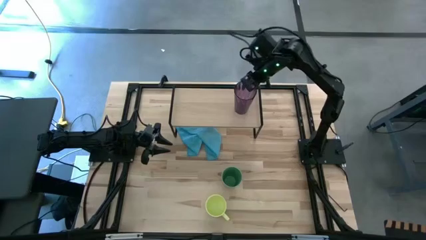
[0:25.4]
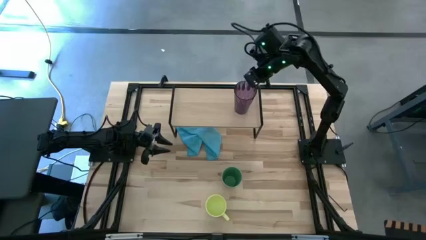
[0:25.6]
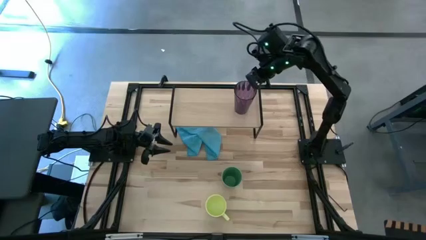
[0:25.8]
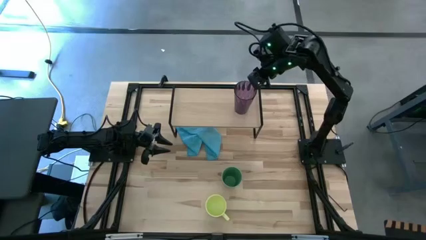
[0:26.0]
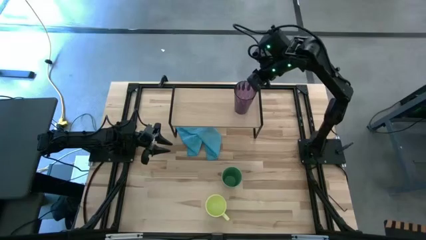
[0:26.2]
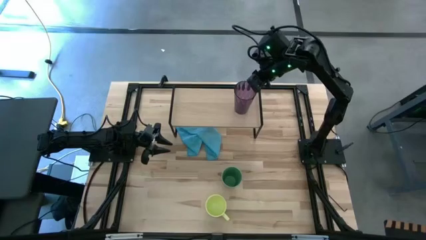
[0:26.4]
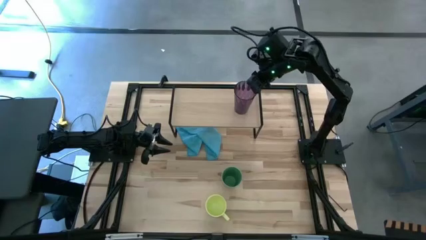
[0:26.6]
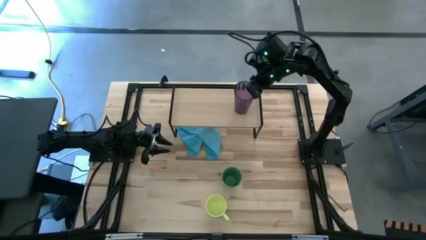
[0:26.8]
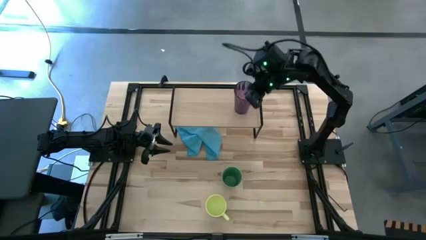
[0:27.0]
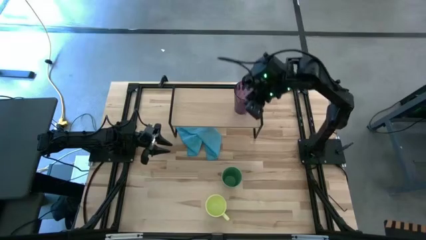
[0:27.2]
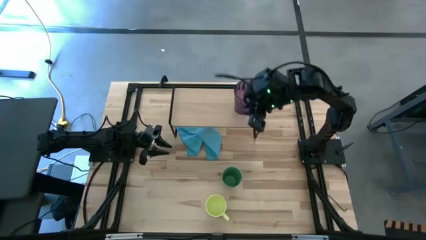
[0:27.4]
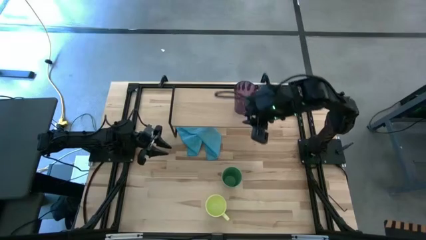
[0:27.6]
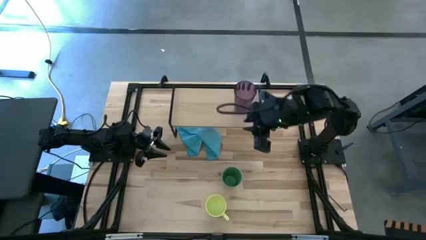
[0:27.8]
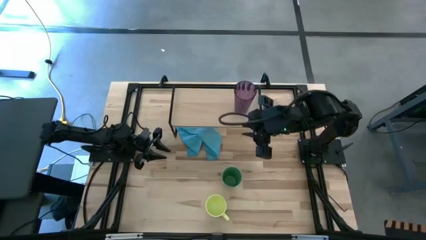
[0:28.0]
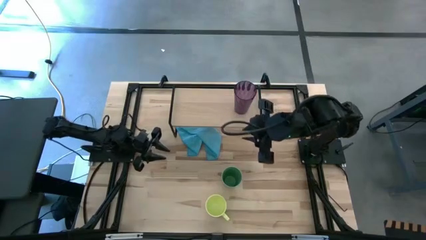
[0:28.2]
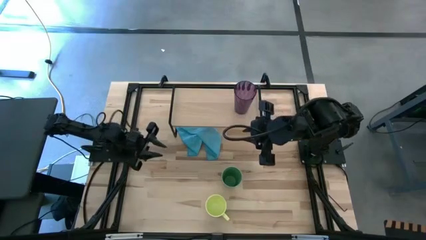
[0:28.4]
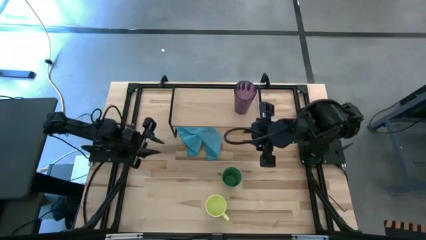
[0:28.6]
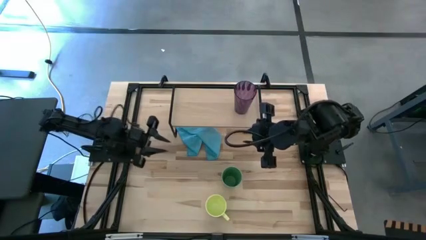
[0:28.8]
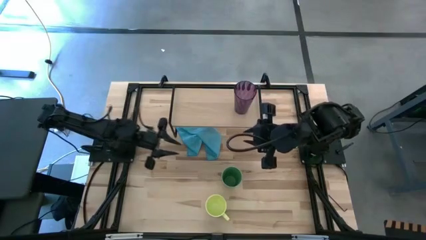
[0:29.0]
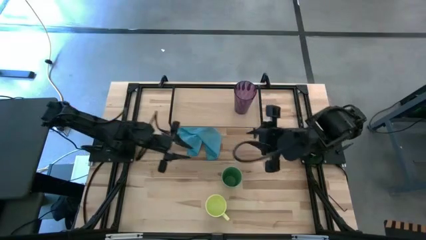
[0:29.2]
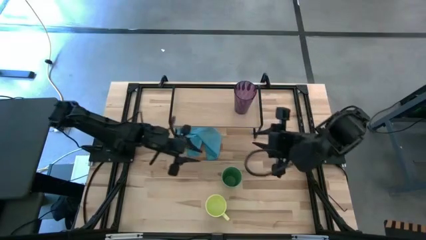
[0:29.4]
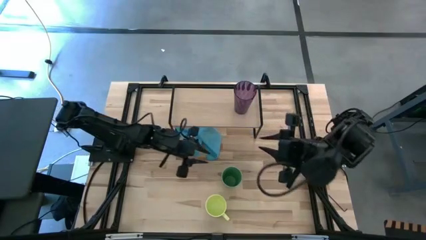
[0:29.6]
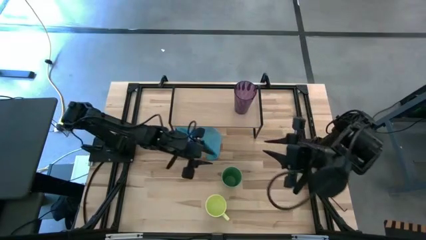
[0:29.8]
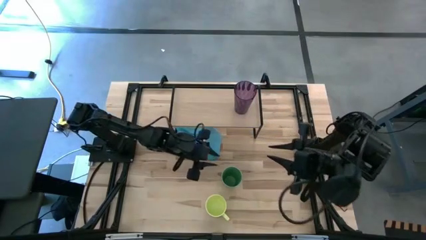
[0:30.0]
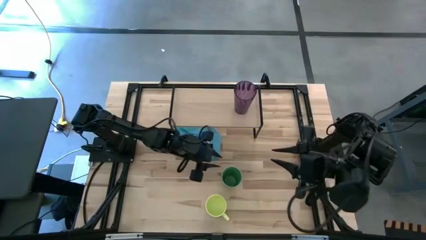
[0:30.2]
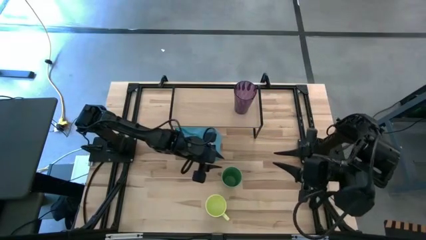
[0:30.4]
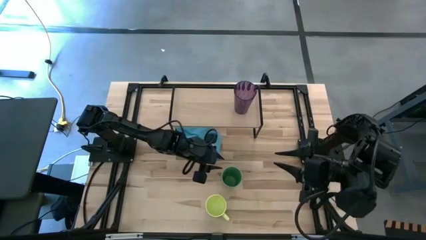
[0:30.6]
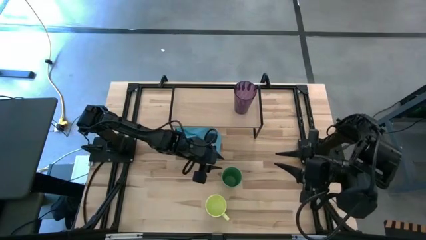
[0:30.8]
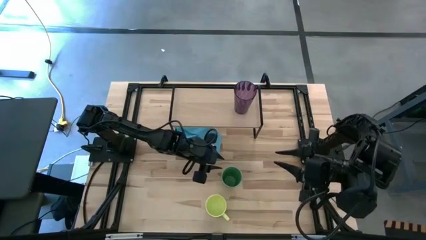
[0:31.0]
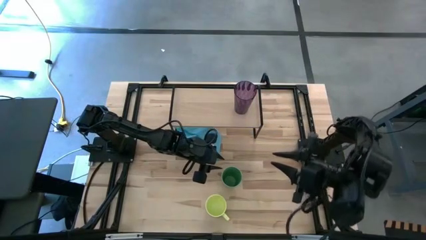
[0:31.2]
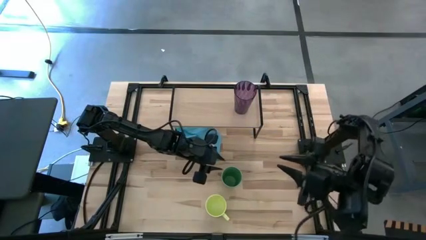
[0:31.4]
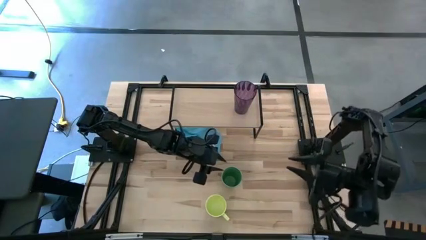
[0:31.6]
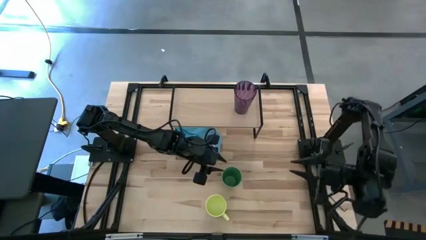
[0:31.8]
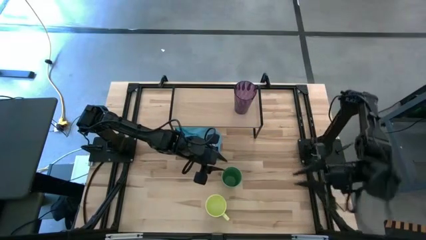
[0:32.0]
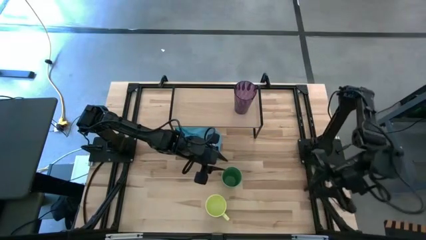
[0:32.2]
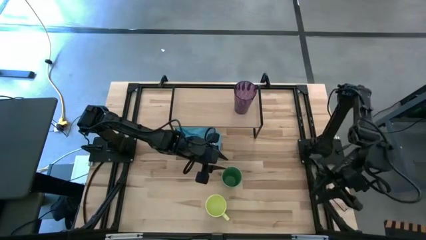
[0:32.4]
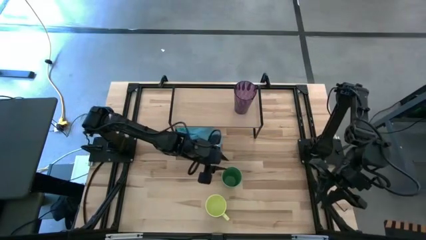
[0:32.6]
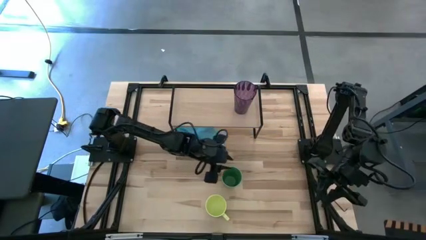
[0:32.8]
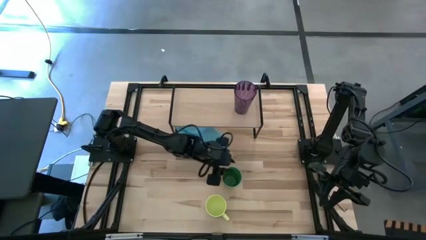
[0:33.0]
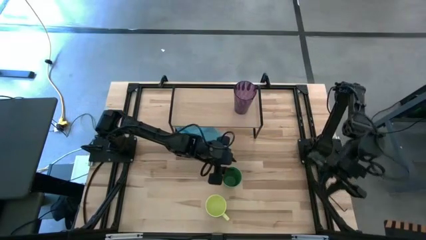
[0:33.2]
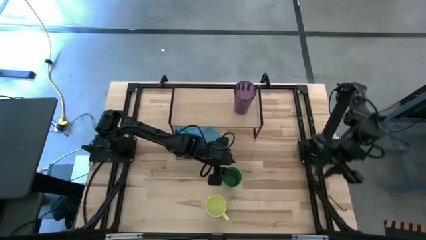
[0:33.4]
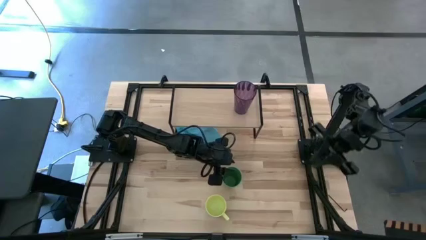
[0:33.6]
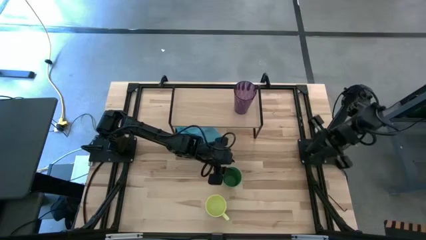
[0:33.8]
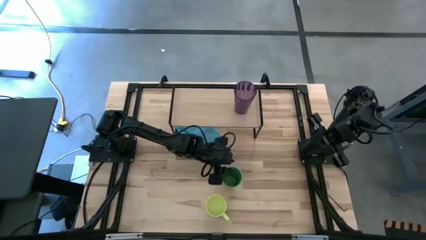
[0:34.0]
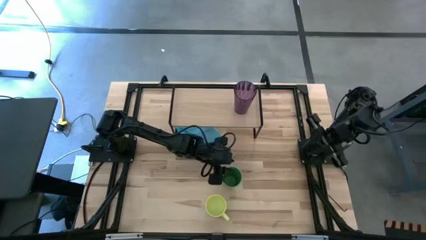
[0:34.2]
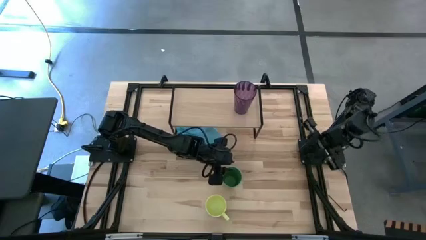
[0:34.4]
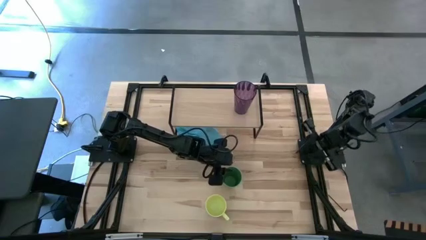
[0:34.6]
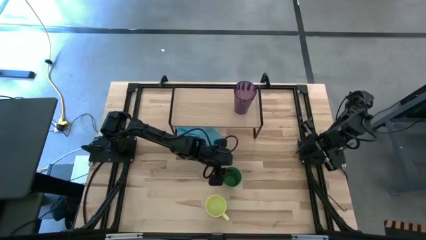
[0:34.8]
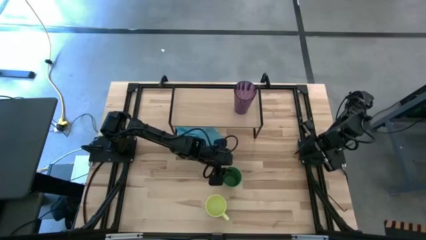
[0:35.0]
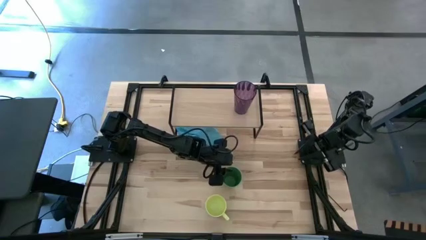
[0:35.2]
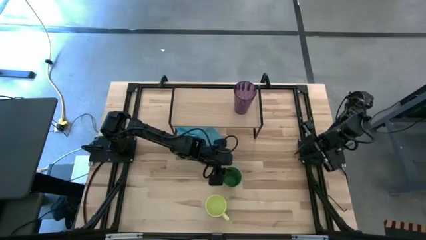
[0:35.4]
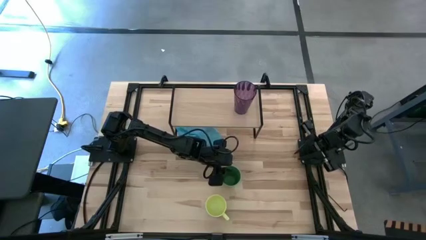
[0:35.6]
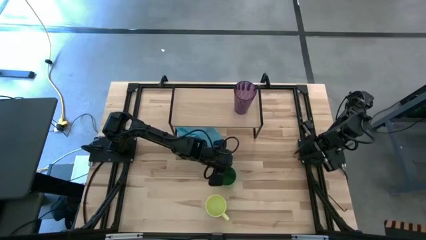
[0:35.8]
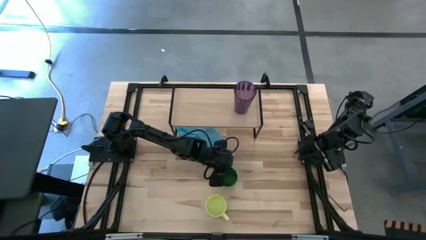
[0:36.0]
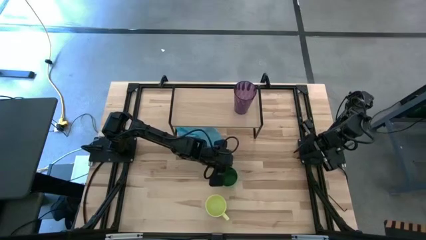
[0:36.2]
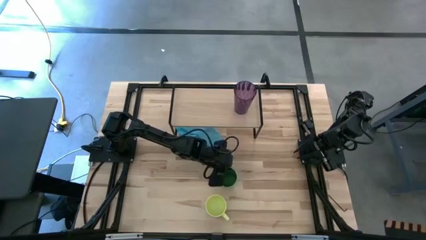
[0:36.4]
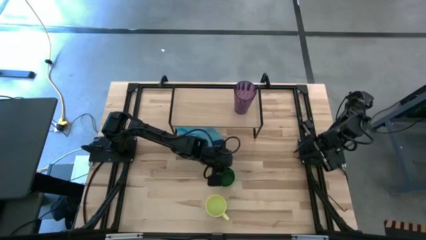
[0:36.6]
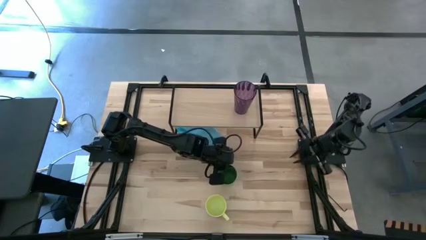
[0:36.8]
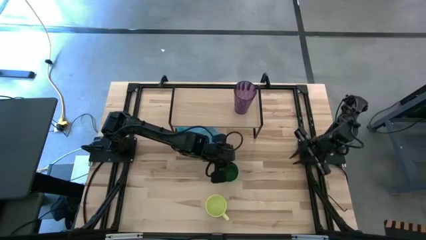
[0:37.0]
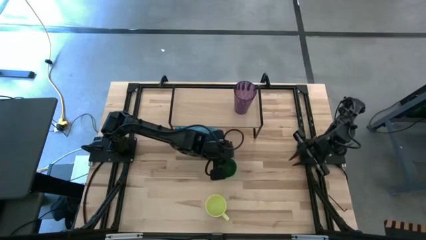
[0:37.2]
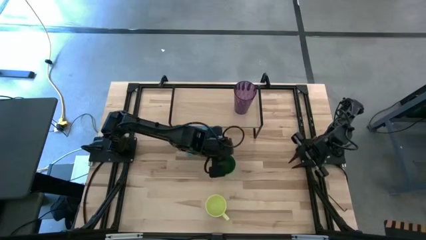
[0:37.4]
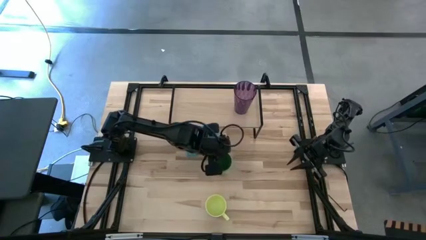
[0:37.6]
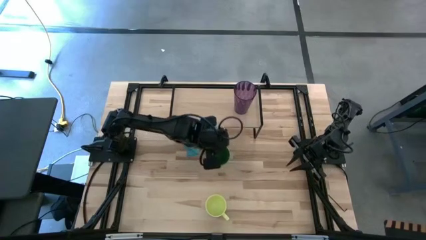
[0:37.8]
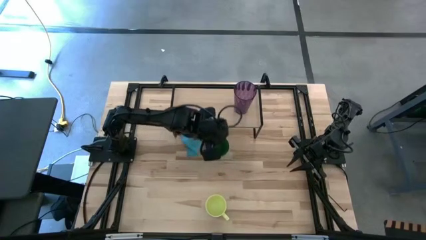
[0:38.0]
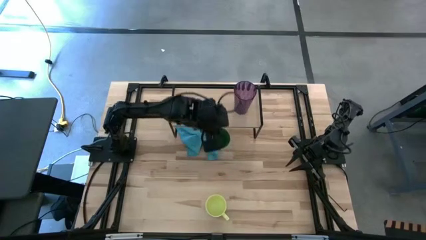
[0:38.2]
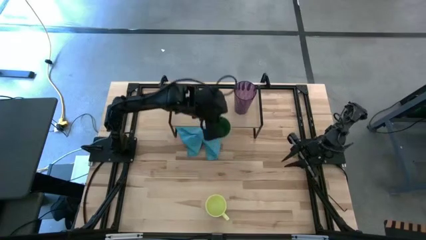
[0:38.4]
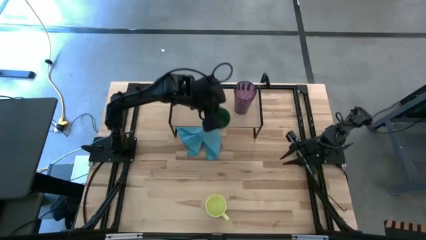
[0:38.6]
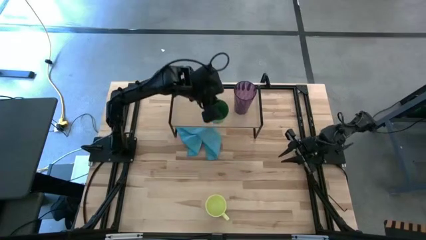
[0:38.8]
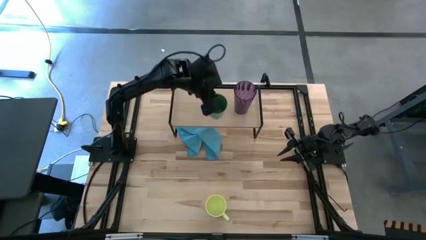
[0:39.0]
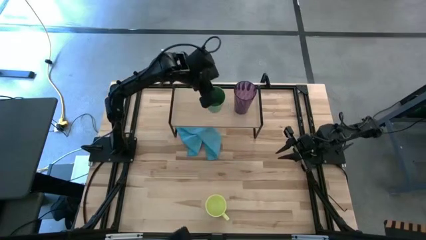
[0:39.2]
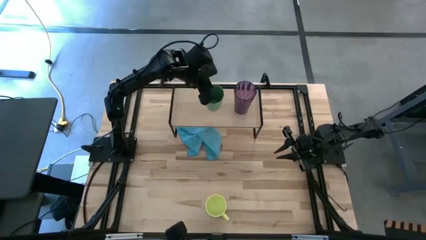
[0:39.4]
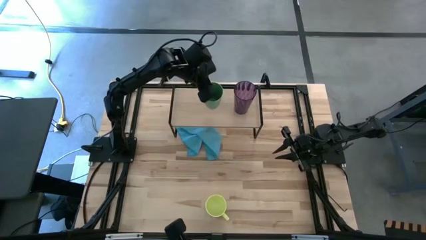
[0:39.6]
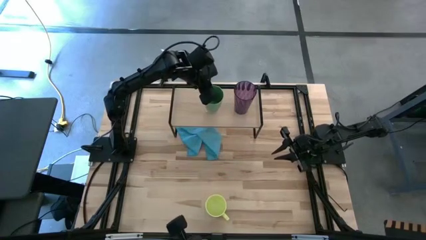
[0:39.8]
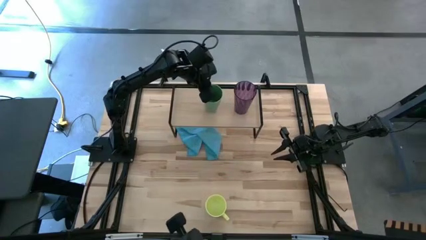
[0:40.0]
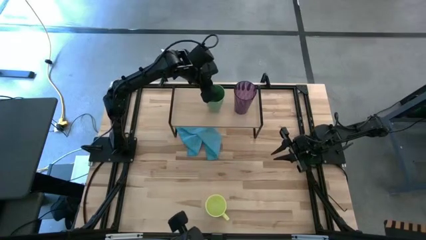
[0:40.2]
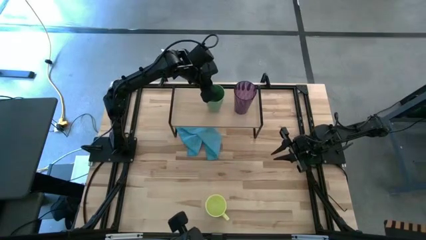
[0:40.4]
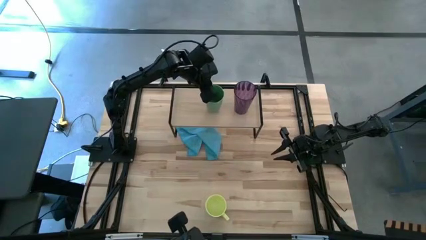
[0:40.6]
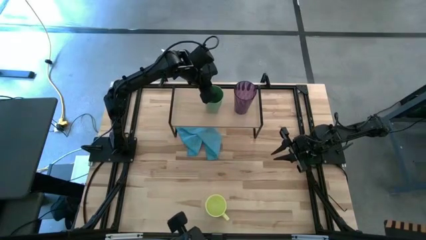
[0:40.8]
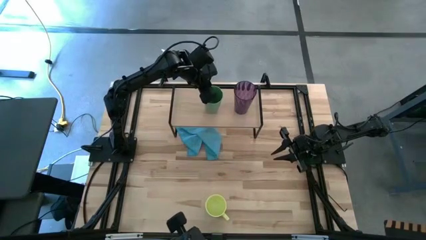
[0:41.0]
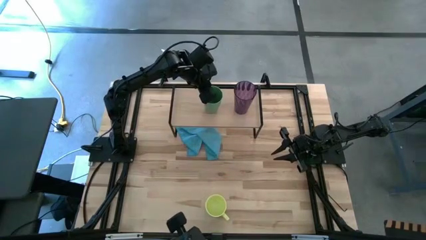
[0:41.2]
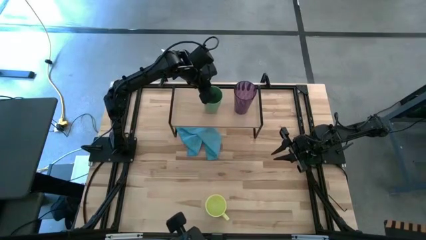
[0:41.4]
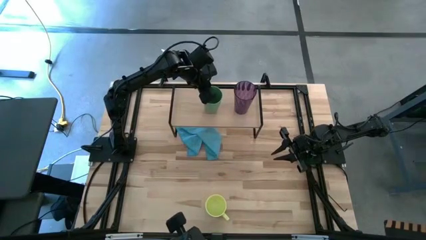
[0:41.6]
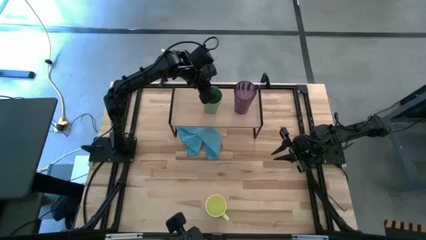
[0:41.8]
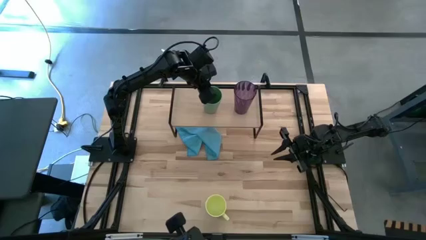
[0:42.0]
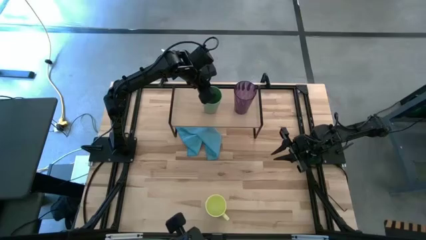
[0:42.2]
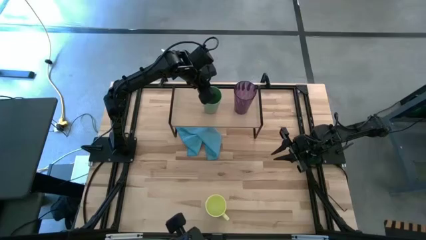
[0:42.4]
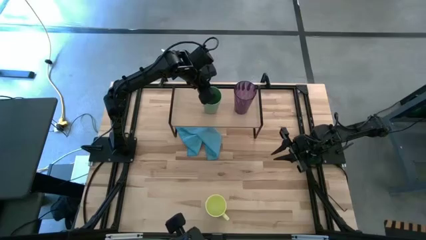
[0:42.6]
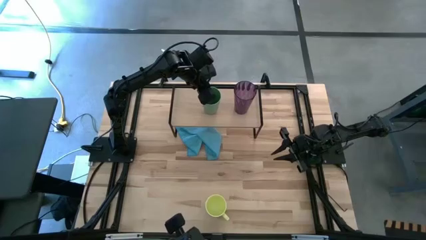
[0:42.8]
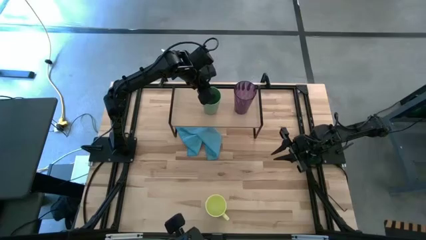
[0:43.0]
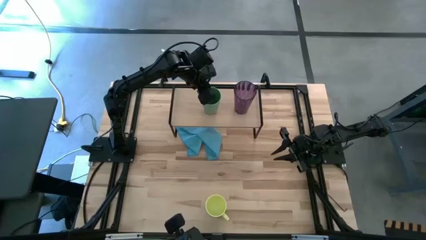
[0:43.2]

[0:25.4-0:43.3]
Task: Stack small to large cups/mugs on shelf
Put the green cup on the shelf
